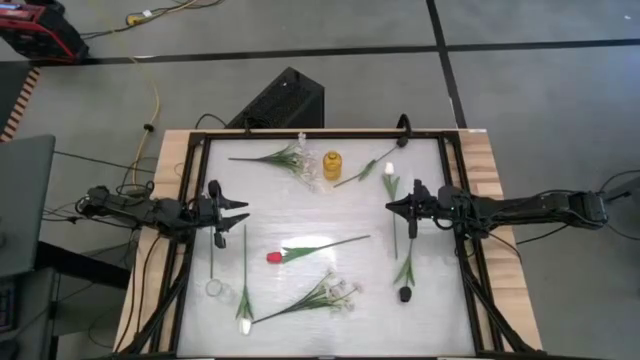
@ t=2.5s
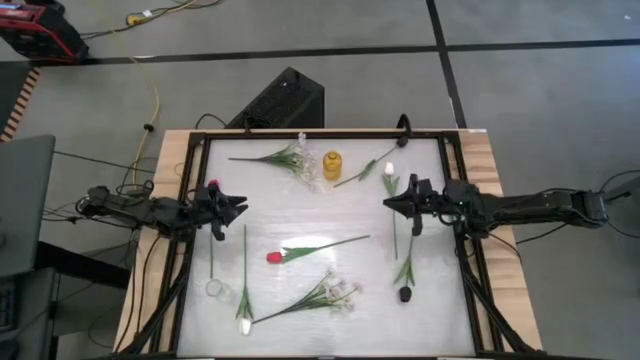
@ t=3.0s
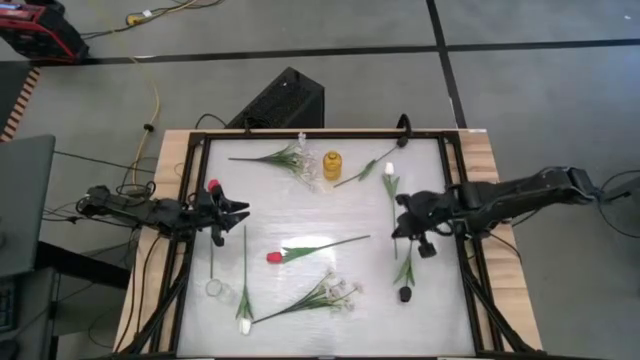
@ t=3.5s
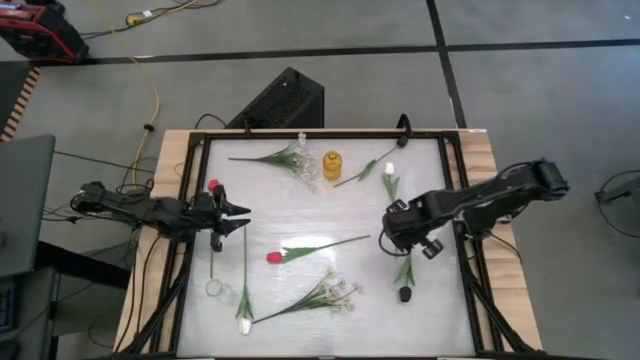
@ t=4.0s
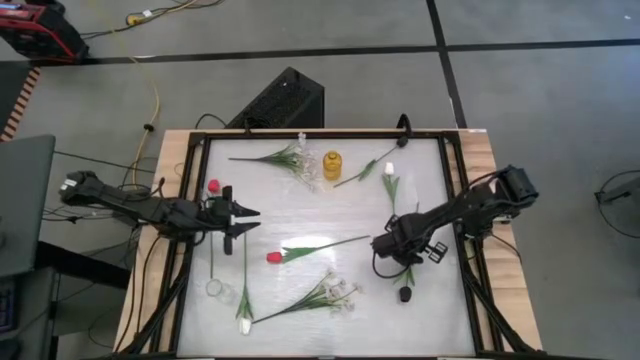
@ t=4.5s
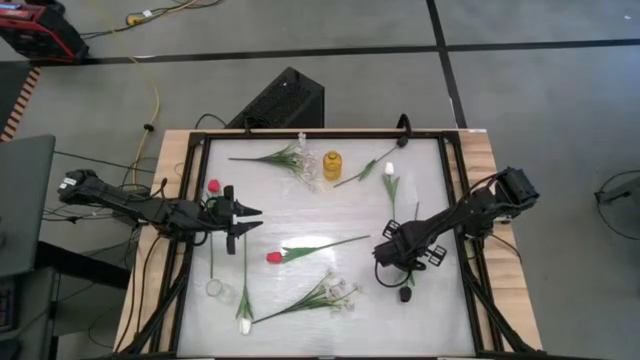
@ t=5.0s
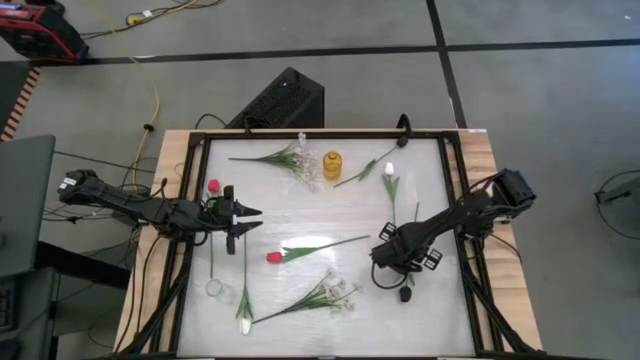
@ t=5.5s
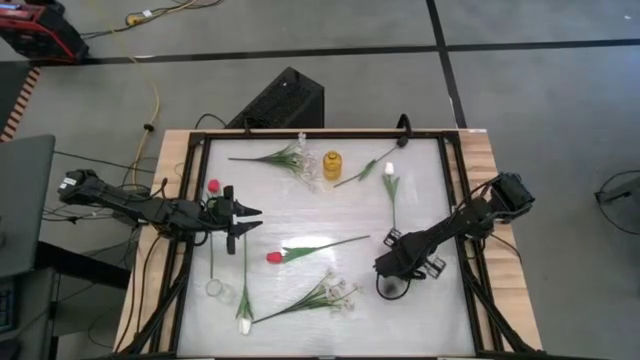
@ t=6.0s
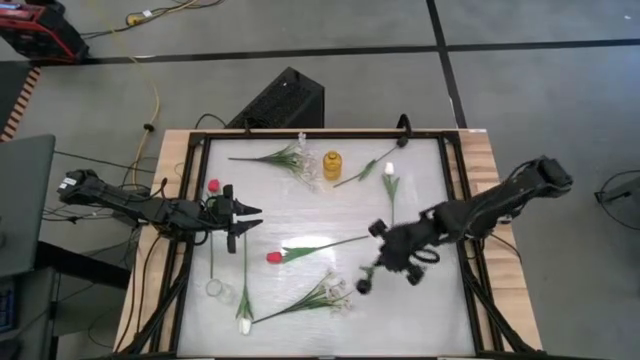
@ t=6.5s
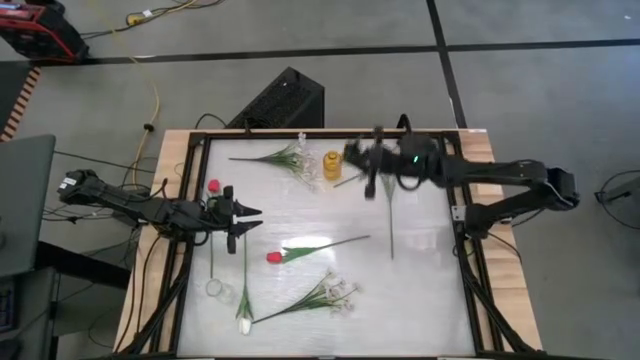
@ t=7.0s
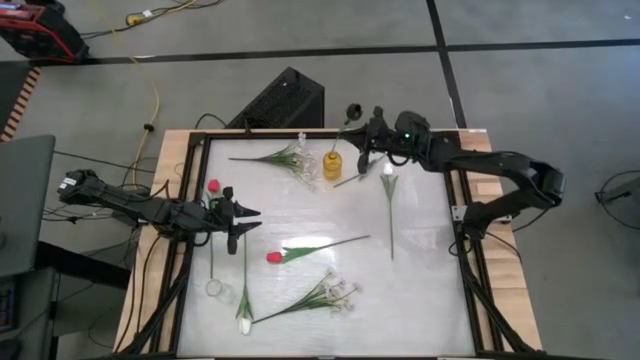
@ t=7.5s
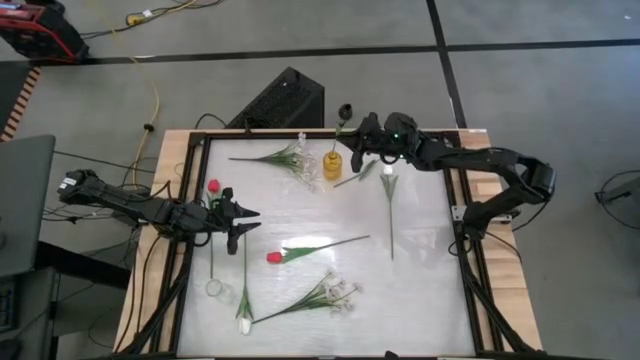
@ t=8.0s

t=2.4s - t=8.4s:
Task: Sort flowers into vase by color
Put the bottom black flower into the yellow vase

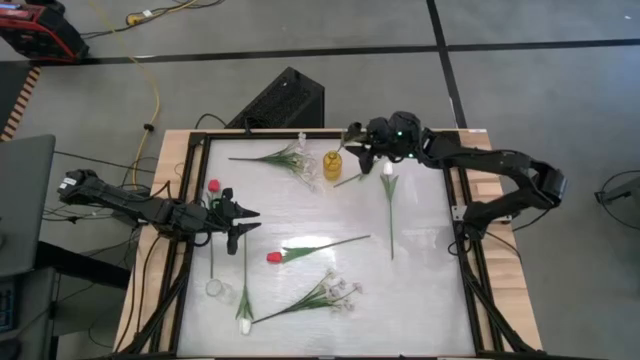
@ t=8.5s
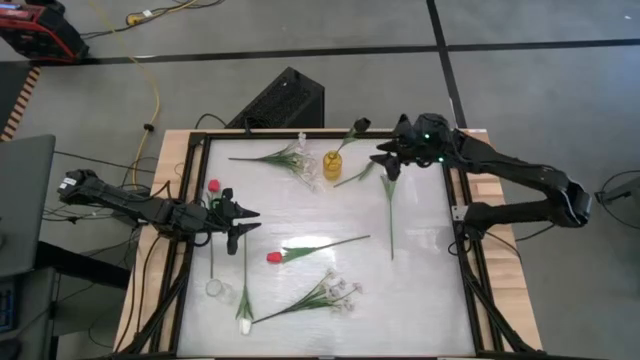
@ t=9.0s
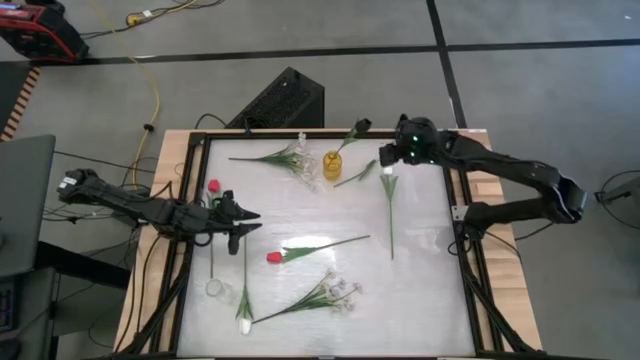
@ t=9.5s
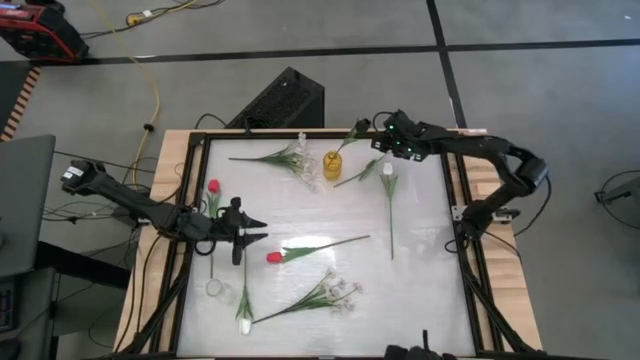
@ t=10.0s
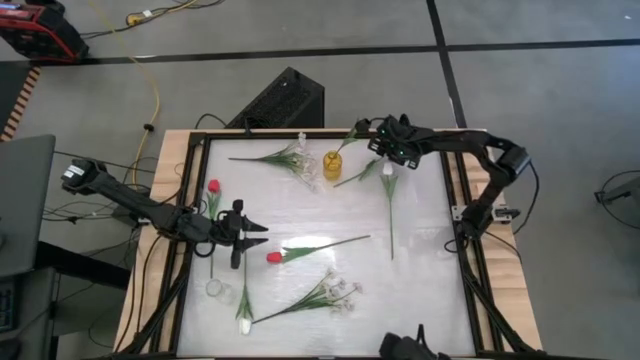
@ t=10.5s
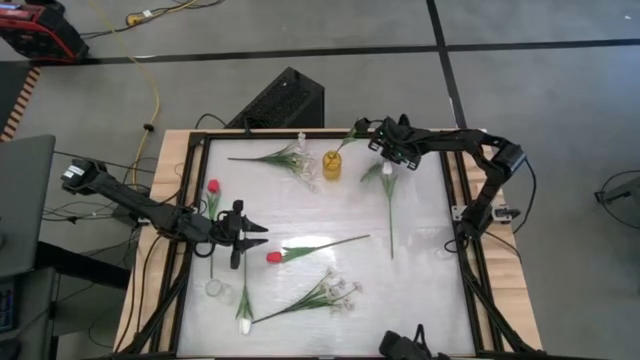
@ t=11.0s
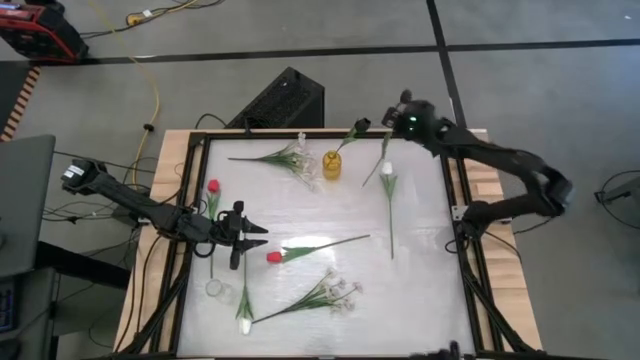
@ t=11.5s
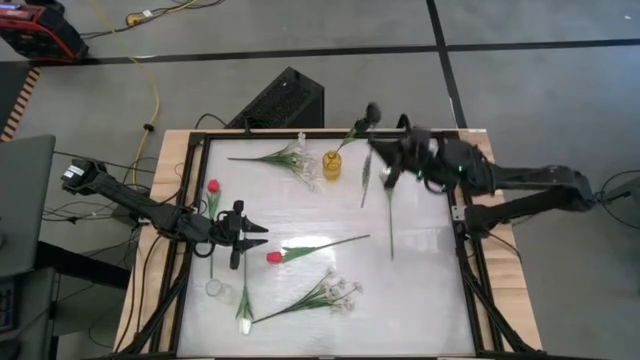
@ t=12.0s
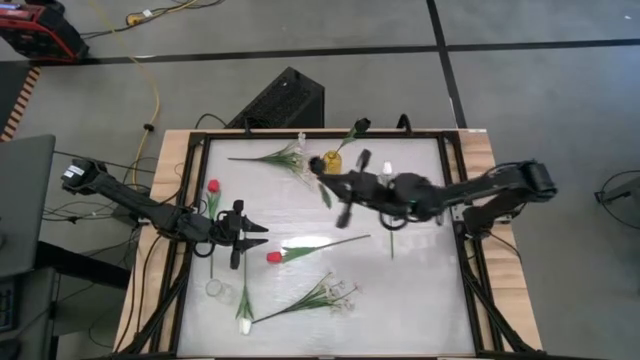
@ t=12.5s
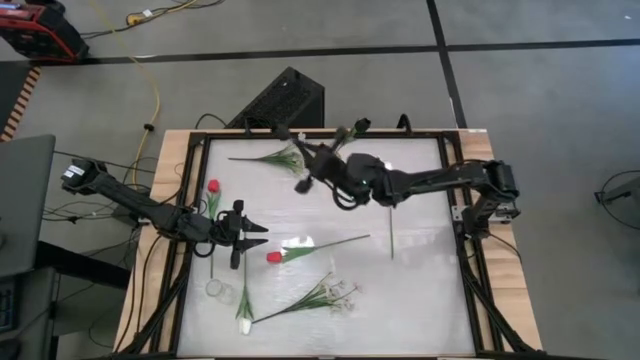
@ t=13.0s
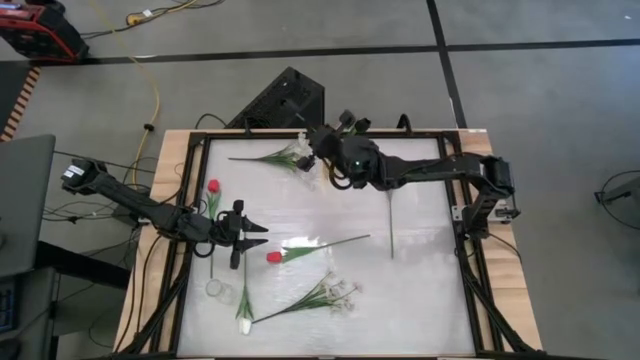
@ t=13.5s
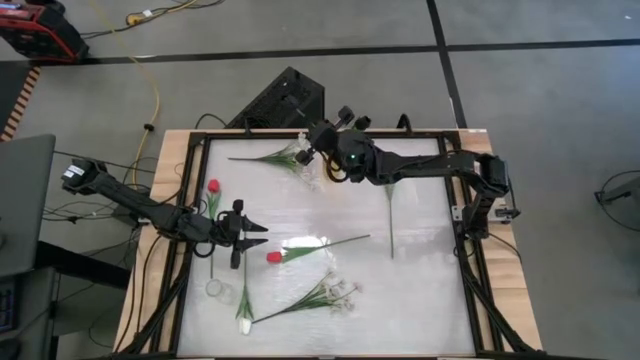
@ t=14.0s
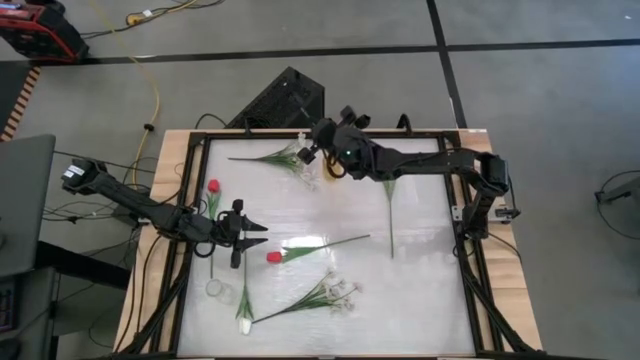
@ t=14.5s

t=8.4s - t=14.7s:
Put the black flower into the yellow vase

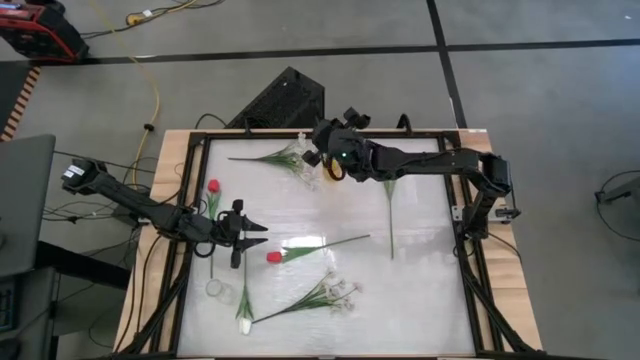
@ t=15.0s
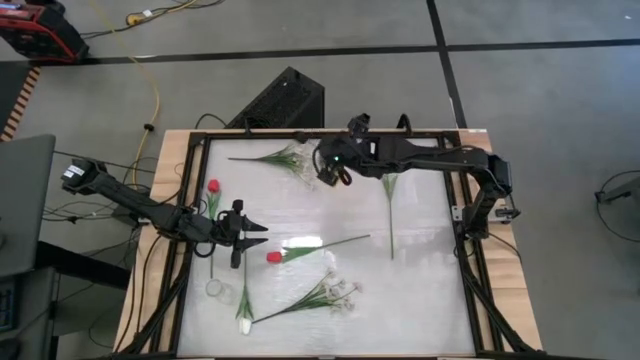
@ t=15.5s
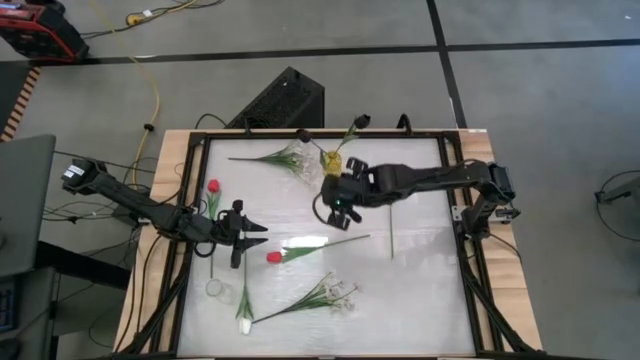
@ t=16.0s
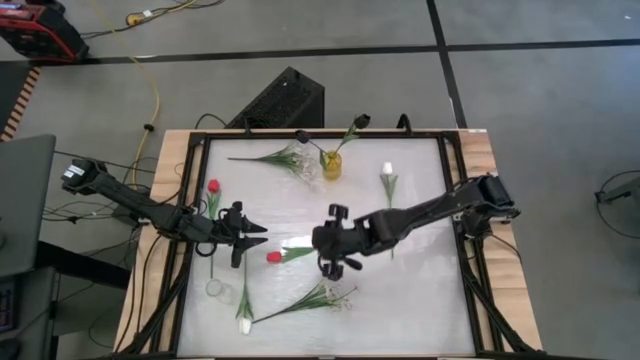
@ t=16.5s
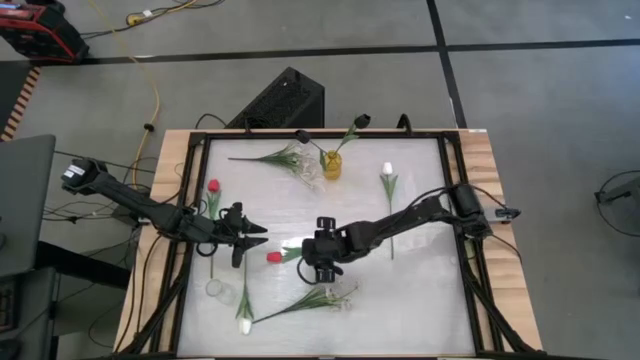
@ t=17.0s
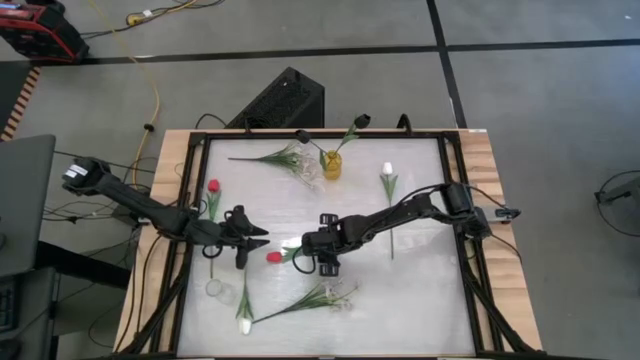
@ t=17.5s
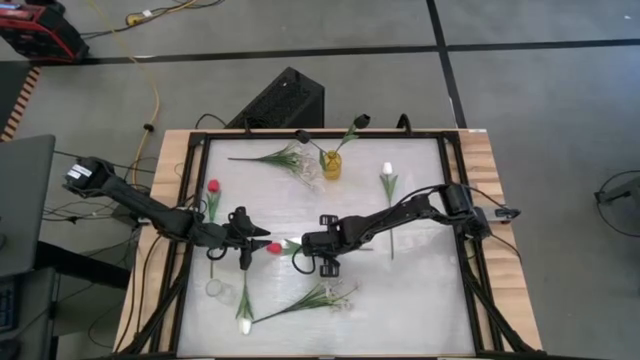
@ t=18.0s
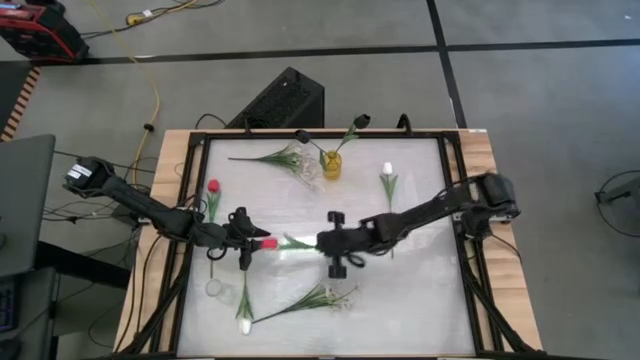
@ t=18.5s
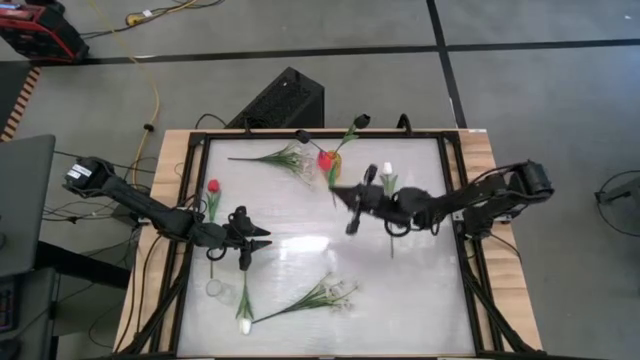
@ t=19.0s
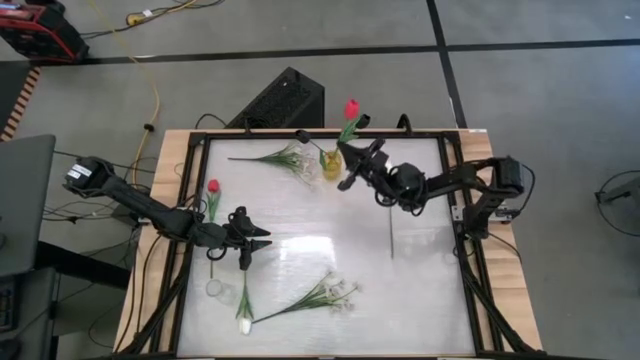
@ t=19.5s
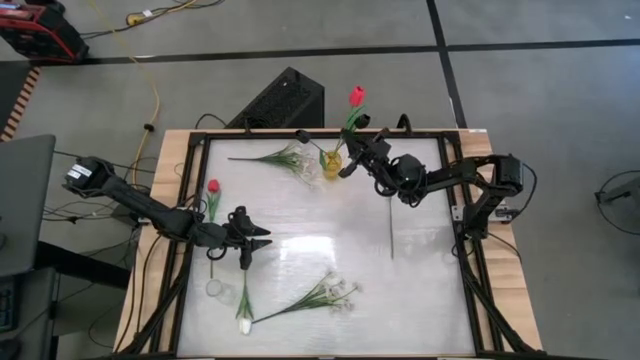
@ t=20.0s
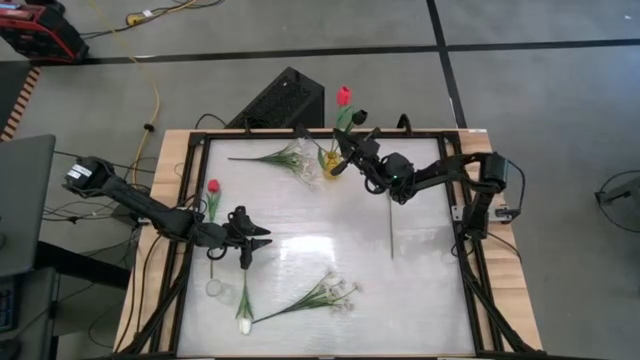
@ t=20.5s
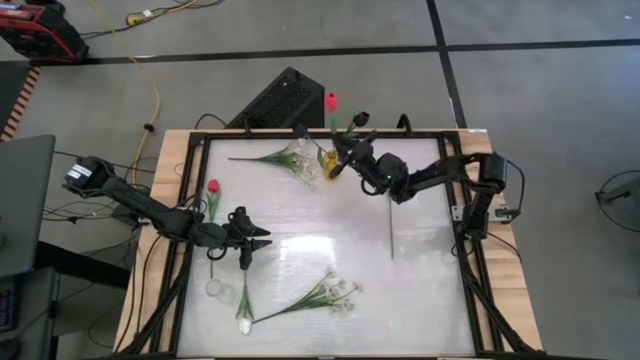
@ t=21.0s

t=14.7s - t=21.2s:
Put the left red flower into the yellow vase

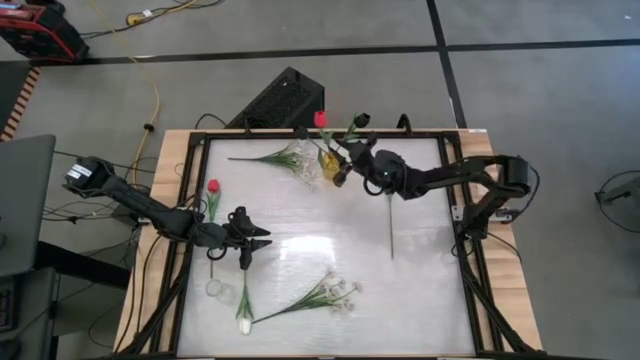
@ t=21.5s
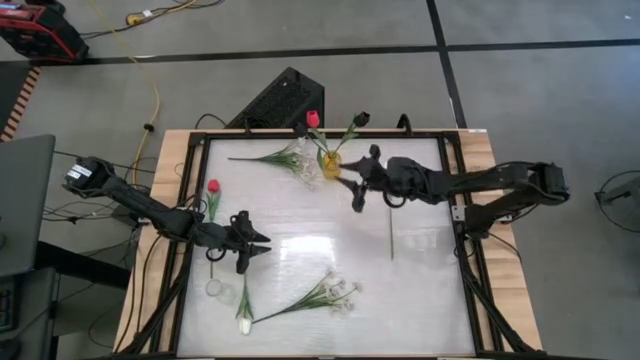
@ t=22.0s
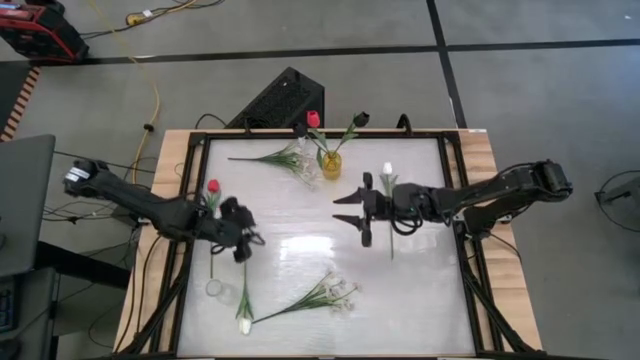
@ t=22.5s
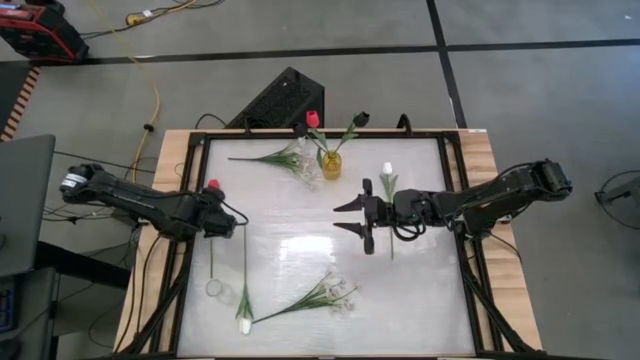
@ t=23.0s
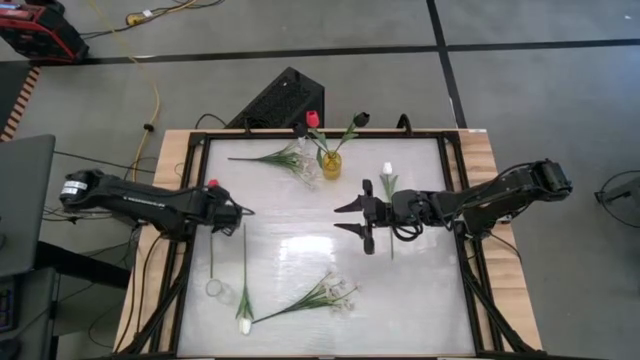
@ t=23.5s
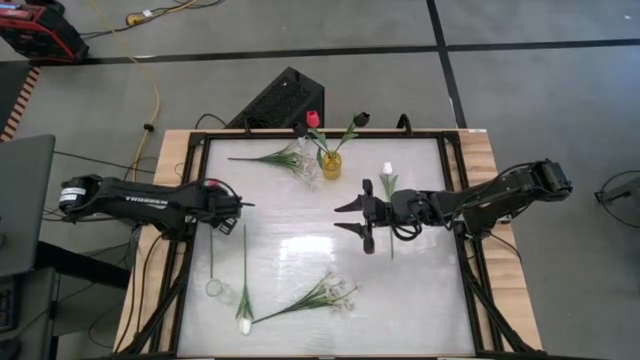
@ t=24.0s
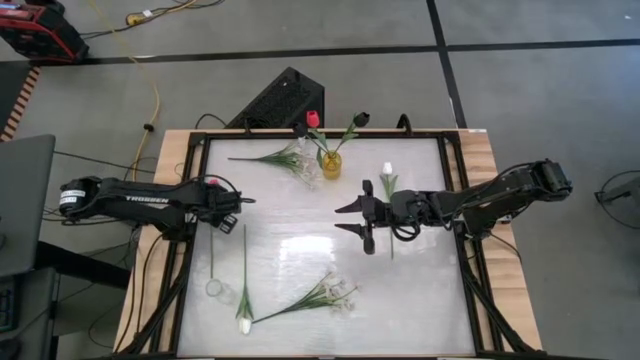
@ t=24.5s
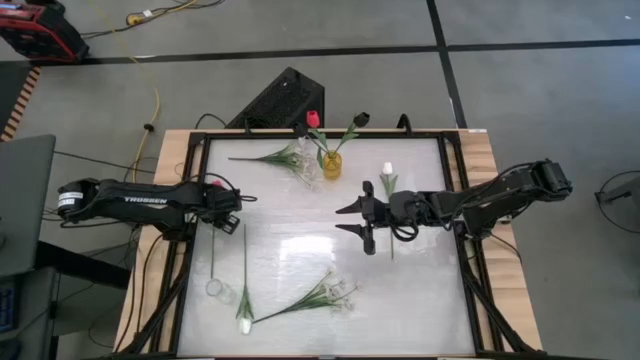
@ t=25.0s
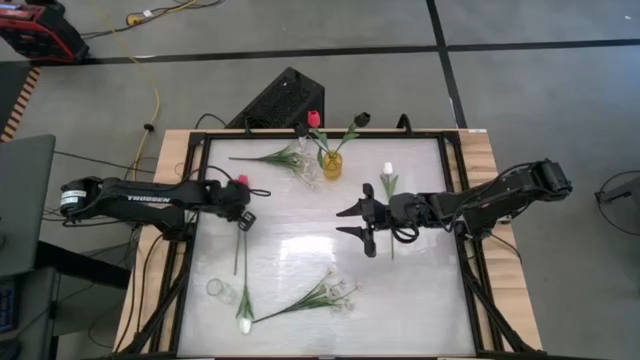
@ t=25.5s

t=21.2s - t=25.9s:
Put the red flower into the yellow vase
